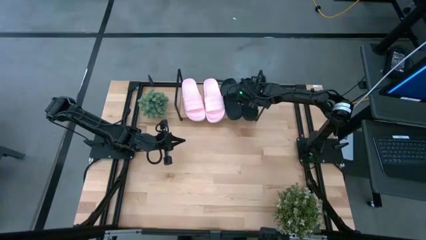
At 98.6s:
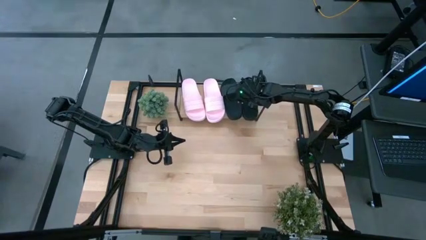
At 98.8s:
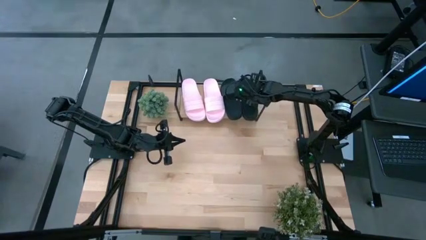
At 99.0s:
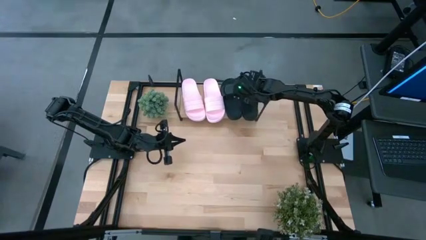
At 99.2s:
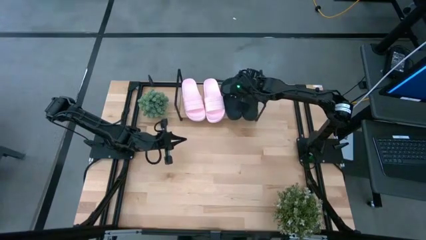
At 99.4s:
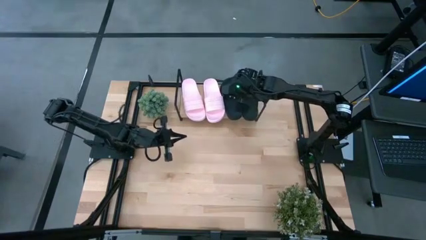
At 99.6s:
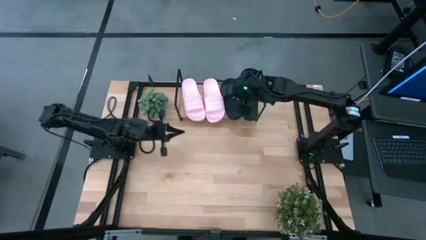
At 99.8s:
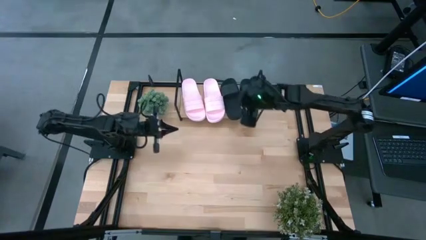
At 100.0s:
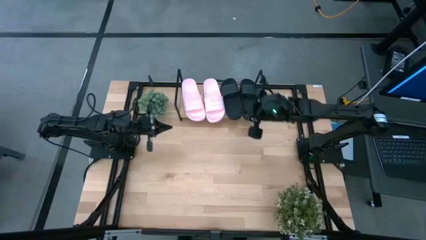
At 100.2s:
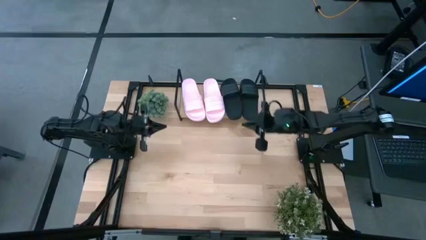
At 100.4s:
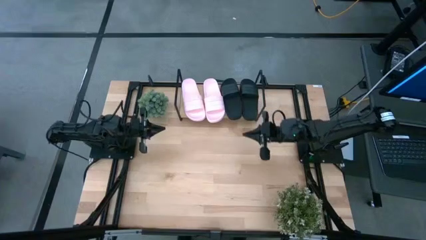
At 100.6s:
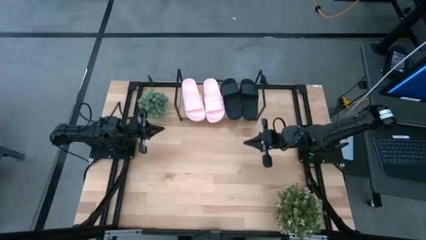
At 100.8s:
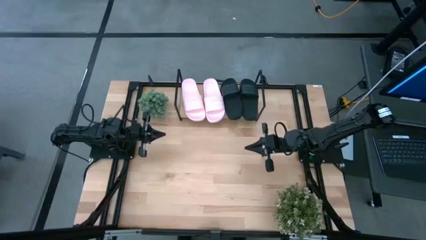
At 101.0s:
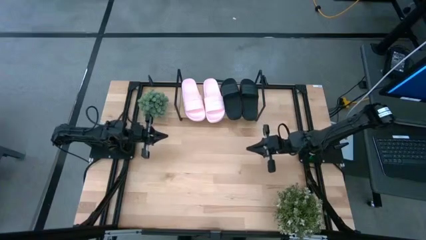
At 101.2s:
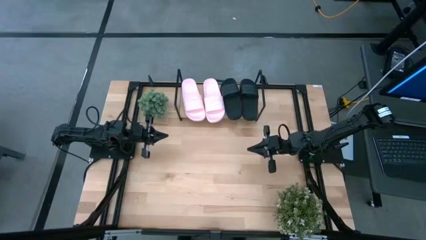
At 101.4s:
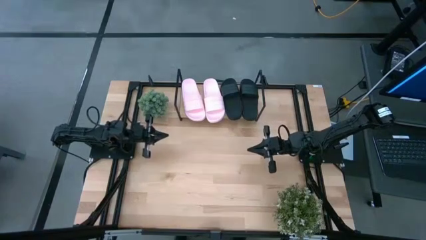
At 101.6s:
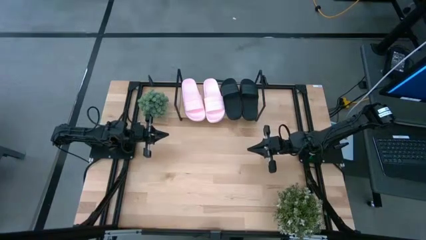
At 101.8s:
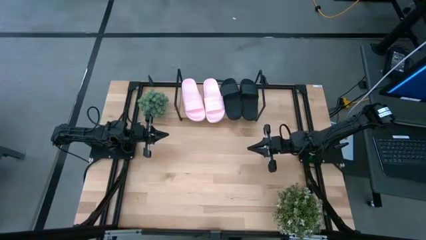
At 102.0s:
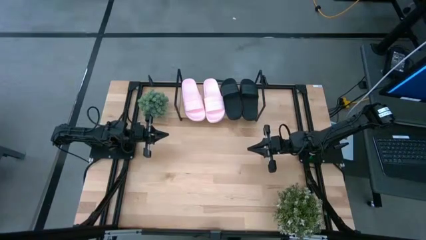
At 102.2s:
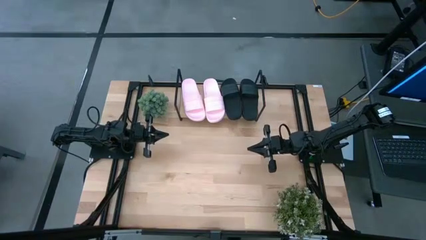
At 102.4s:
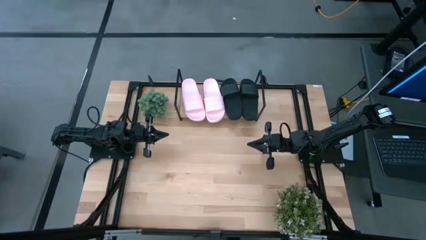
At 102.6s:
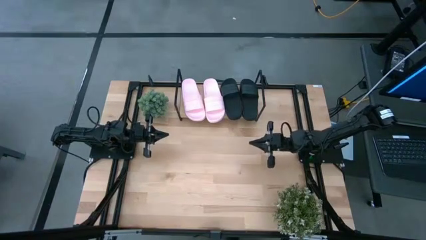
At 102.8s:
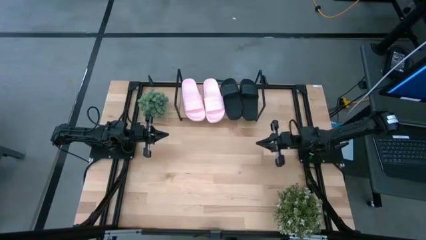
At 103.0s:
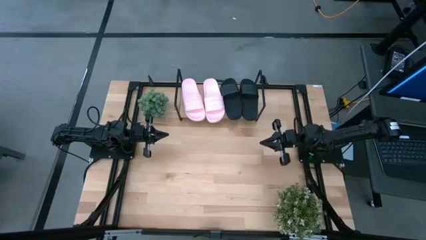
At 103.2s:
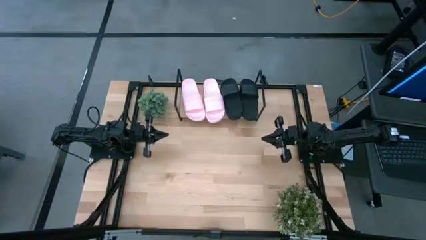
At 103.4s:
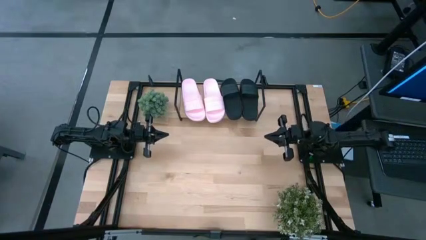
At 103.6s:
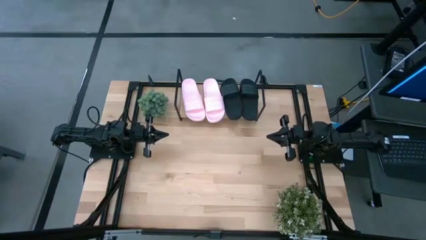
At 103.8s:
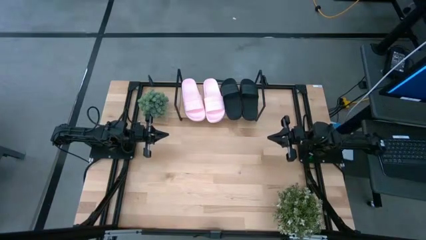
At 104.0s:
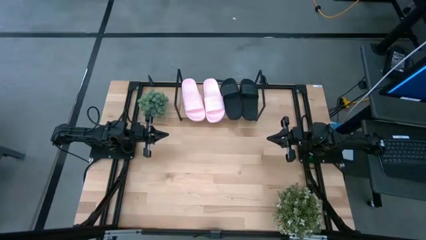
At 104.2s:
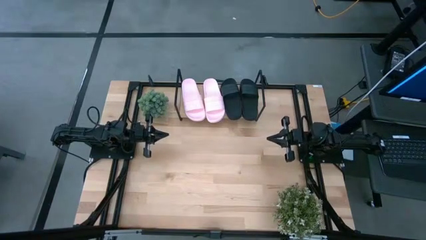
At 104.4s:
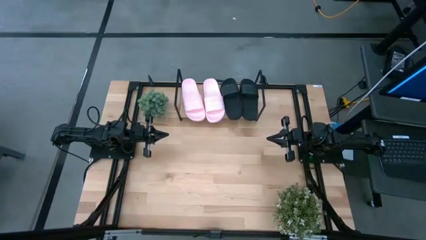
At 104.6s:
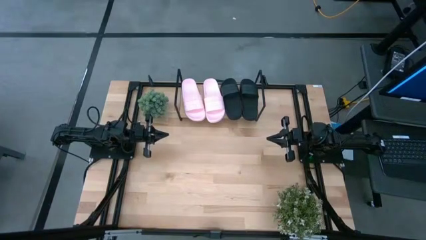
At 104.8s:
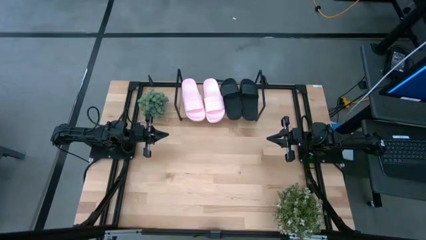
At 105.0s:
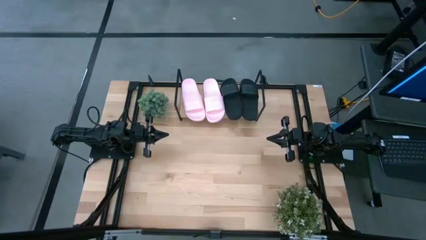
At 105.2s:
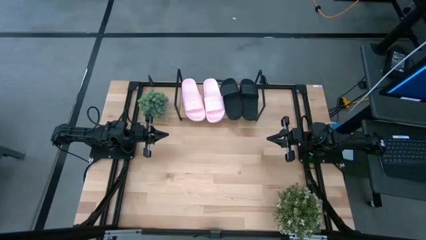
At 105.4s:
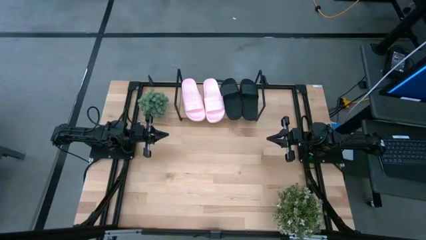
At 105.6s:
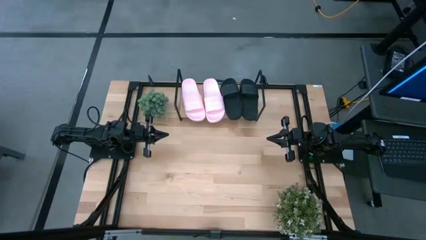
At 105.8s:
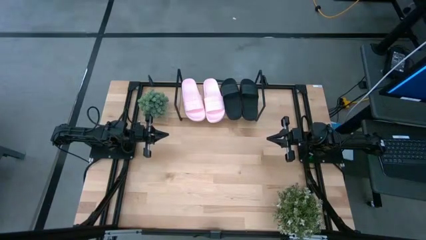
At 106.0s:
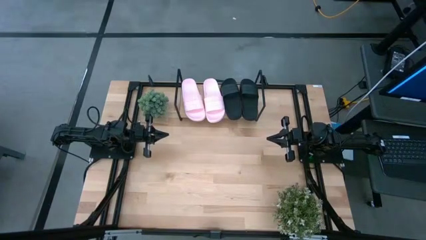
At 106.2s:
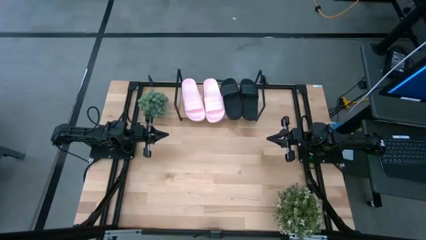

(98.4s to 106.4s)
Task: Pick and place slides into the shelf
Return to Home Position

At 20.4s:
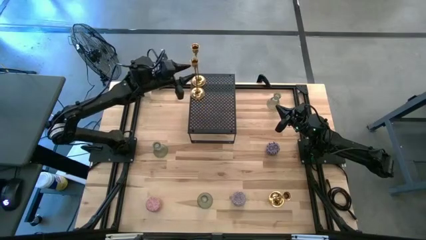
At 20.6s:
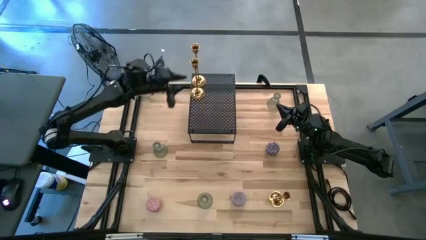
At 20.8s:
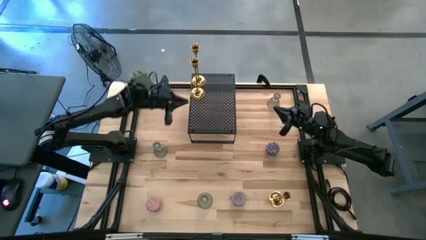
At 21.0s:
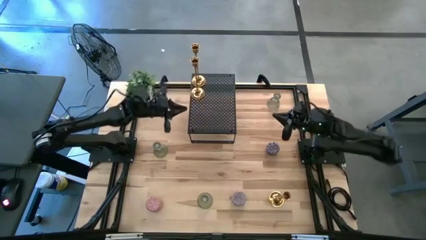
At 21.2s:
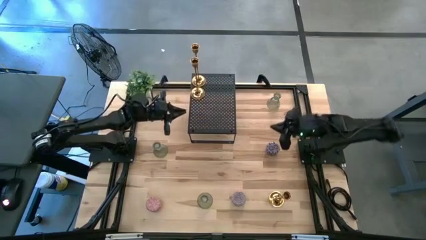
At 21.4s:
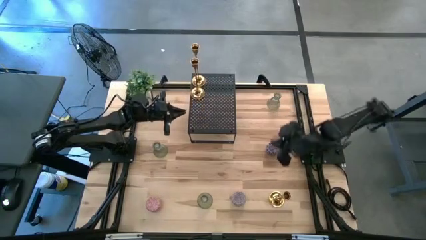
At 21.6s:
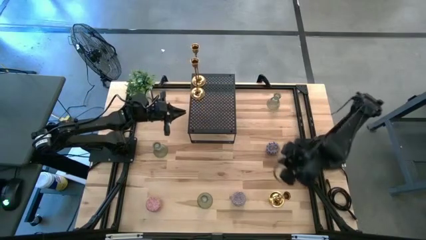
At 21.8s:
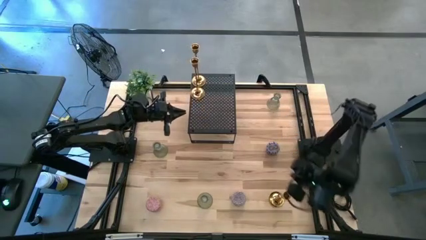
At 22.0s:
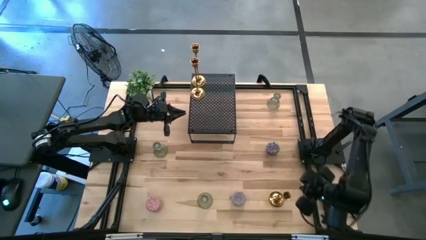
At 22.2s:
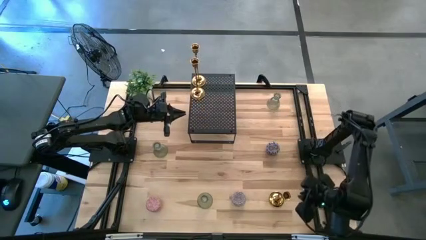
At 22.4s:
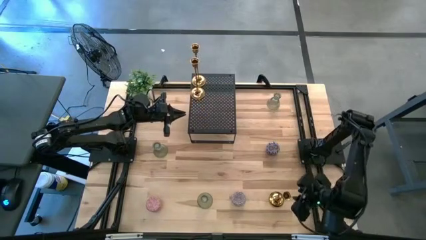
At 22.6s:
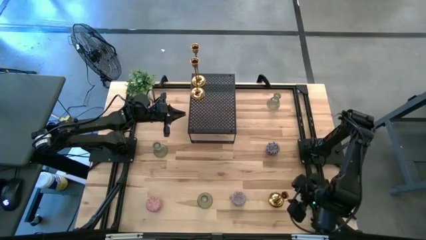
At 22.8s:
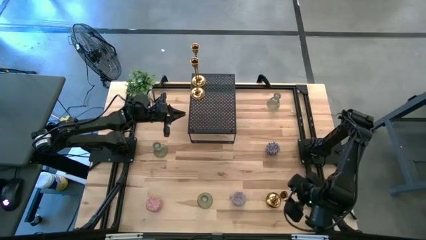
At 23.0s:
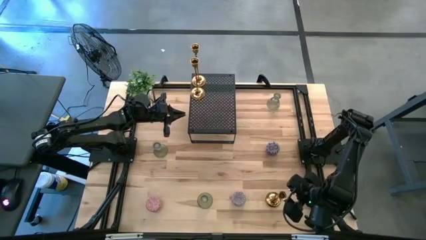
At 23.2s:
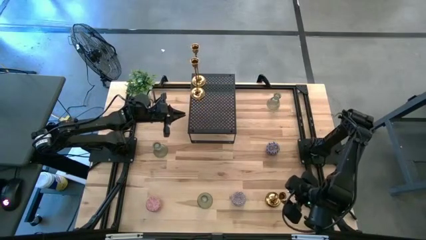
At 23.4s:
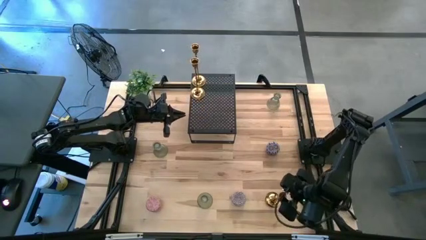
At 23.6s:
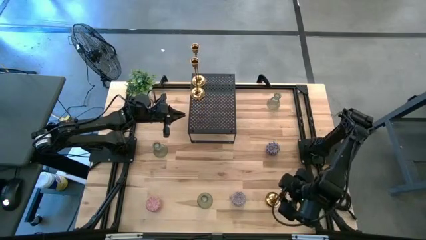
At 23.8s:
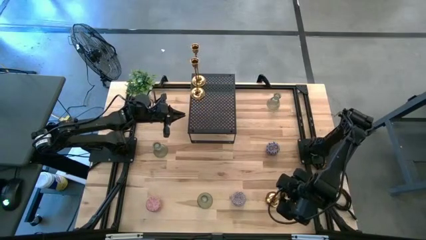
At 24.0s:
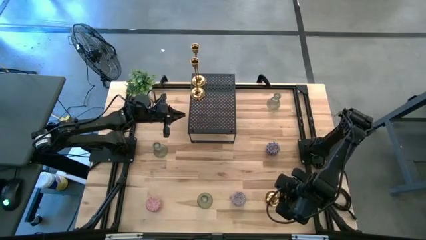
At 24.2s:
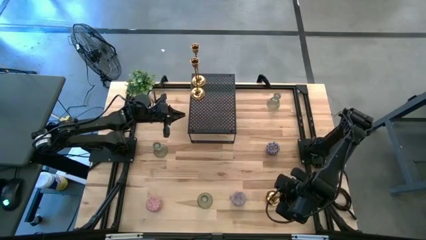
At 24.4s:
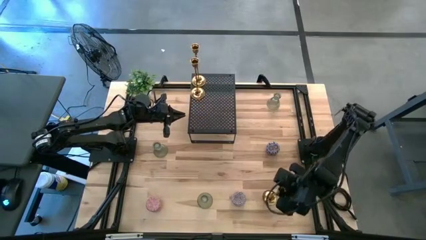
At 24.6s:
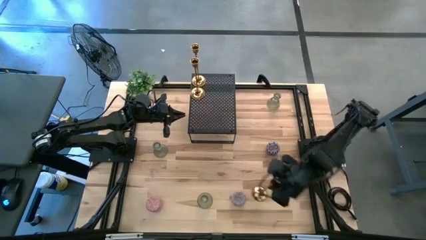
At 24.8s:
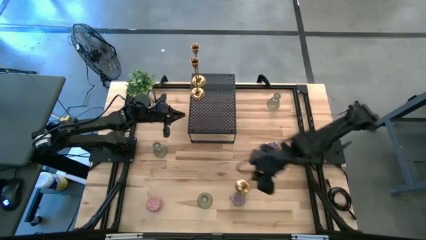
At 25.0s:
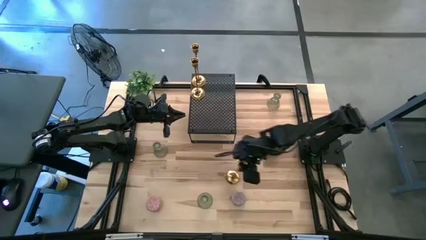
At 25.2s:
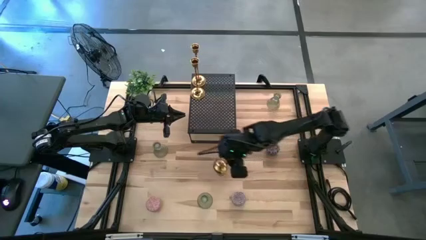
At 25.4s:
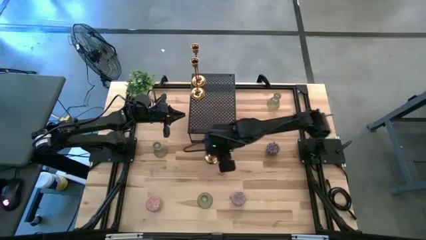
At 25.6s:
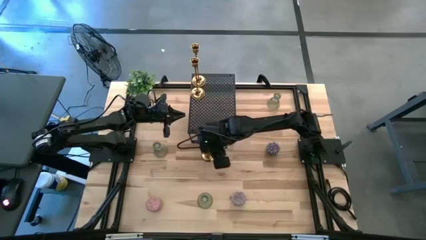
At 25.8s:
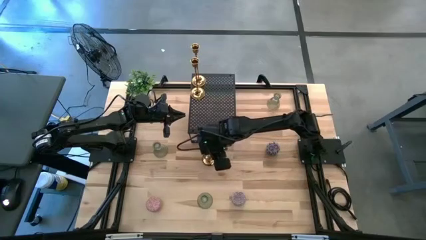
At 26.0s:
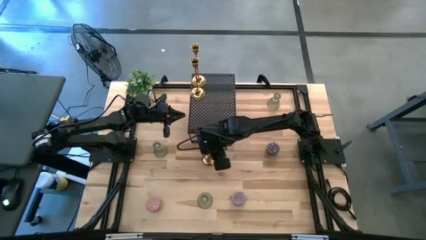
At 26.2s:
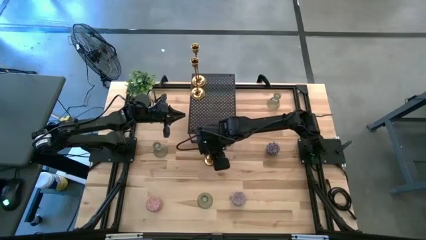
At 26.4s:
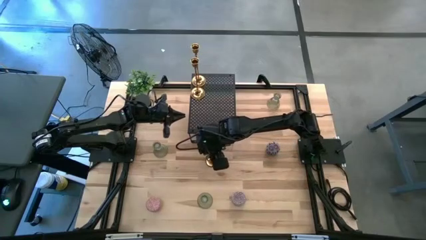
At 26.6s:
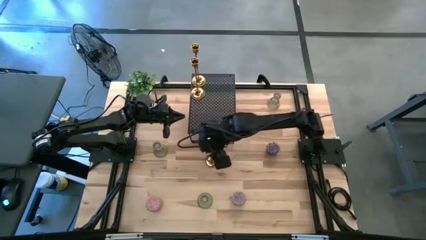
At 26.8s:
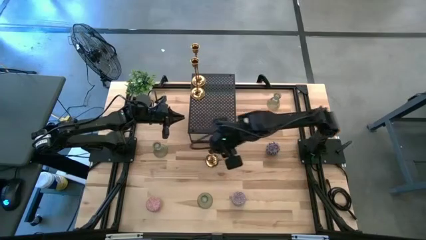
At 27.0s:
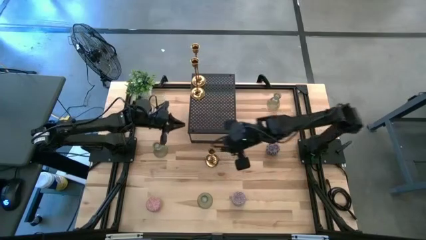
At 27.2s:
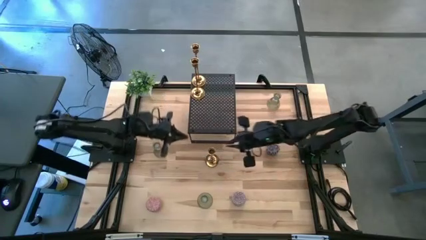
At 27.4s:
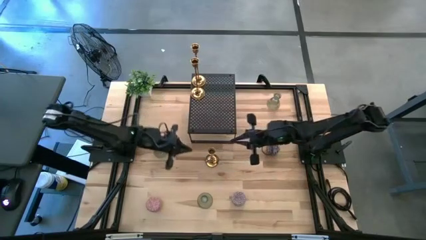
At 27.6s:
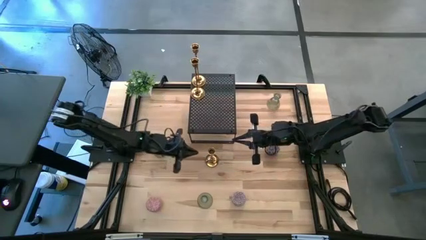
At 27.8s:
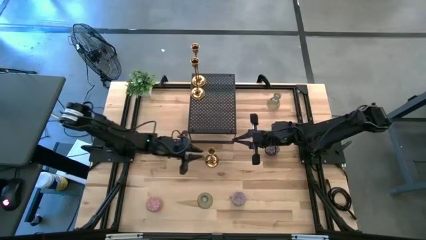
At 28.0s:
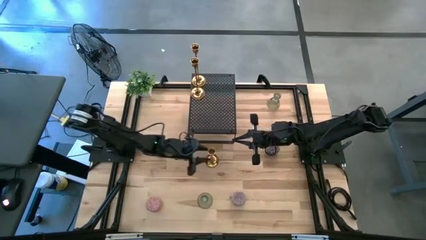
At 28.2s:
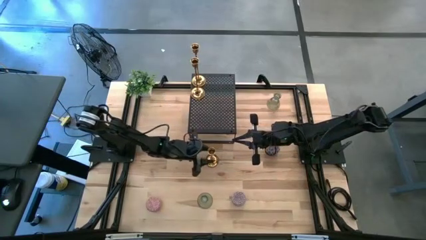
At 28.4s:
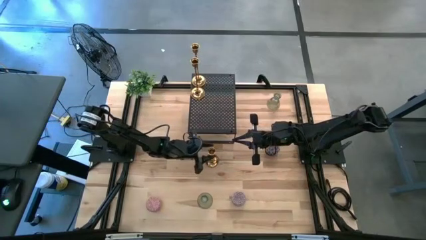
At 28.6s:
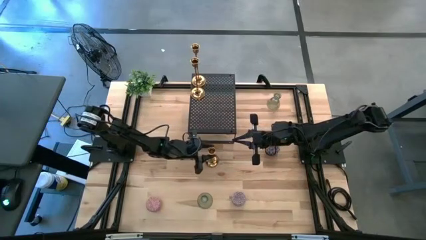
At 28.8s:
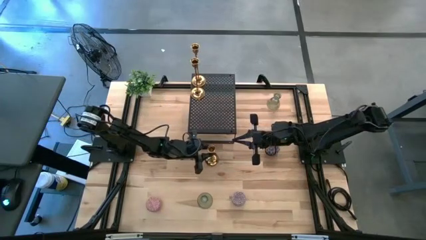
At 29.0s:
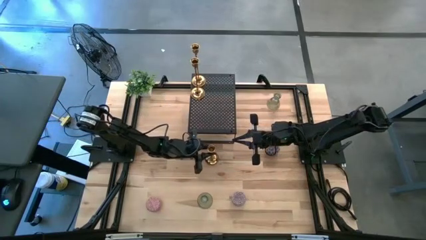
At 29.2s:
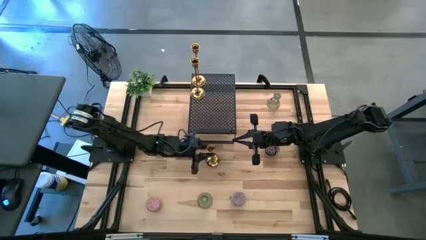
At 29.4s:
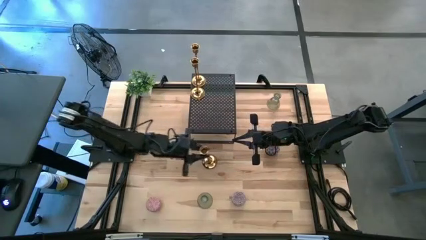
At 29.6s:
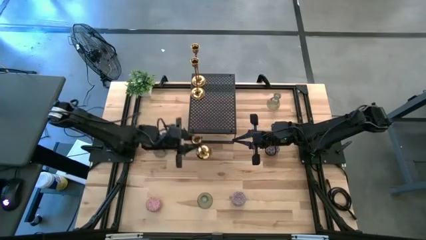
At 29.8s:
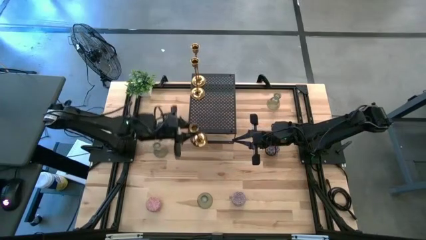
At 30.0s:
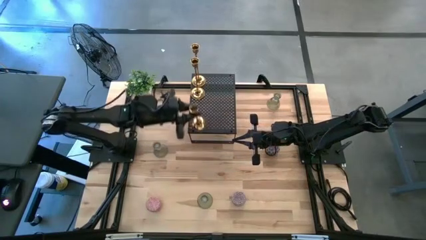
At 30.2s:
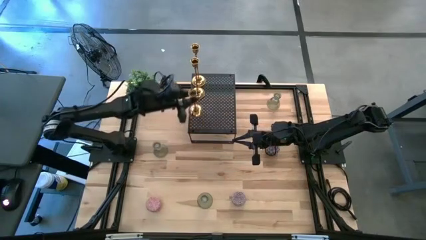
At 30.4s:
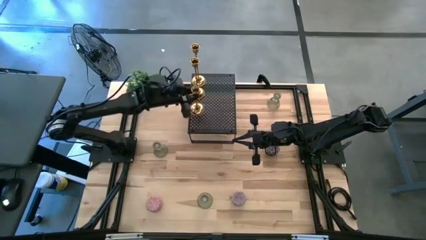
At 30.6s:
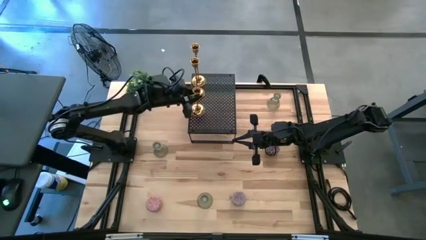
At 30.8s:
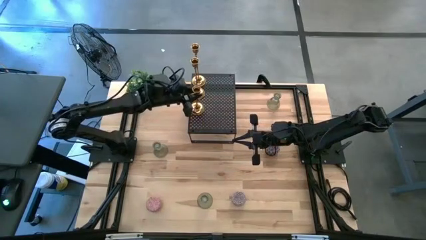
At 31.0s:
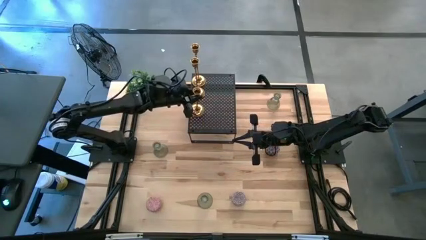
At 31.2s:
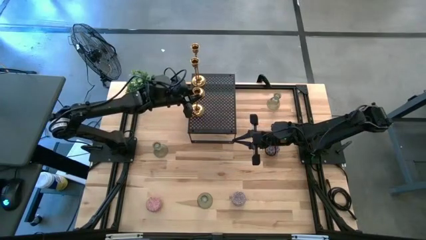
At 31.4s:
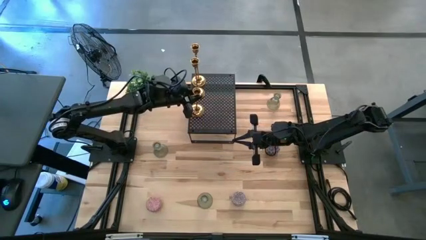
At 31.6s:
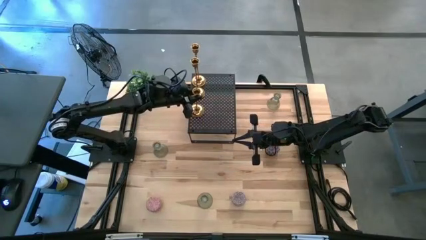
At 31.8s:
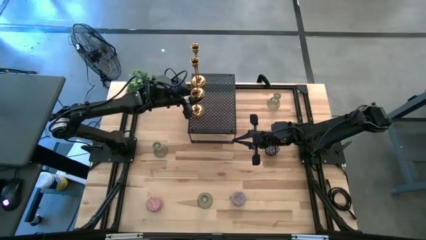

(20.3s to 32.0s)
Task: Pick & Place candle stick holders
Put the gold candle holder on the shelf aligned with the other gold candle holders
